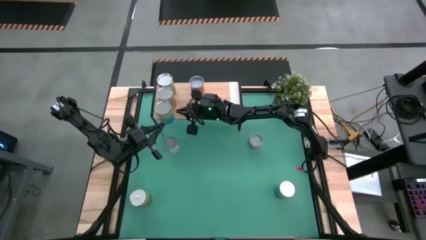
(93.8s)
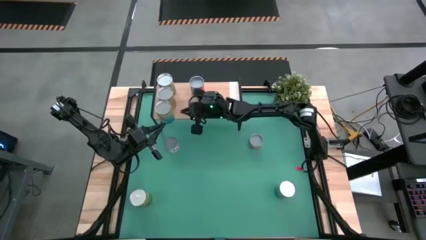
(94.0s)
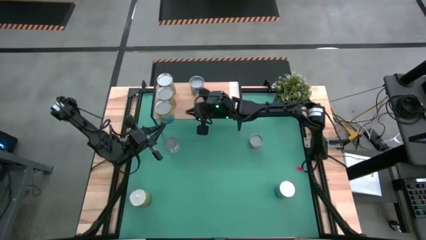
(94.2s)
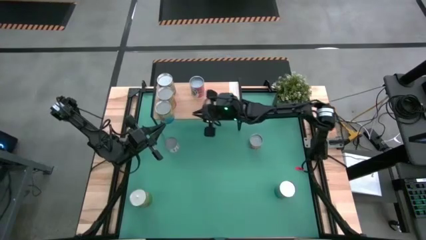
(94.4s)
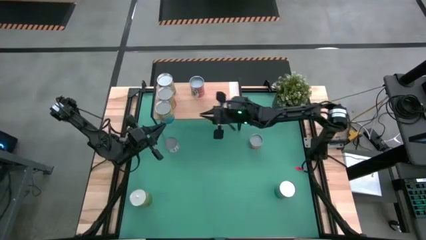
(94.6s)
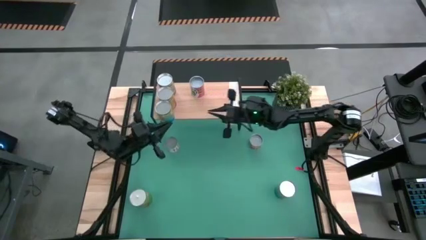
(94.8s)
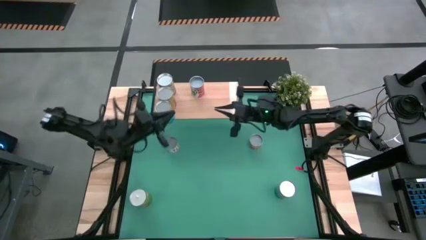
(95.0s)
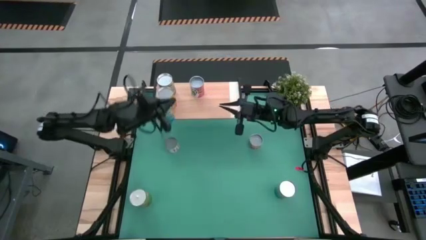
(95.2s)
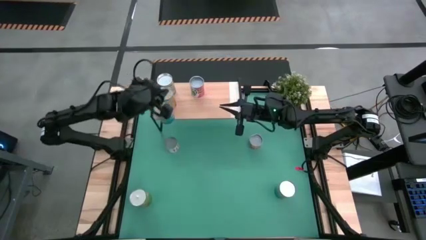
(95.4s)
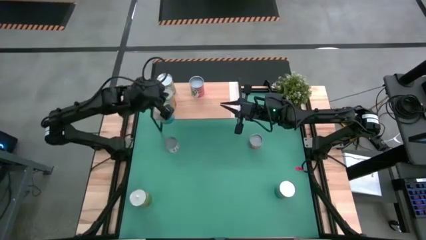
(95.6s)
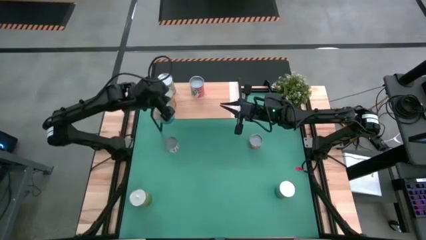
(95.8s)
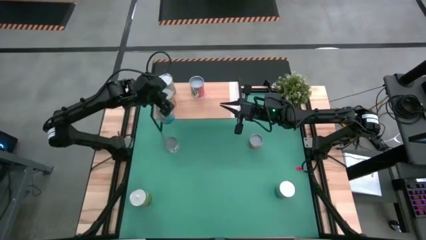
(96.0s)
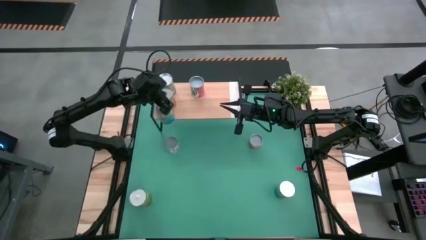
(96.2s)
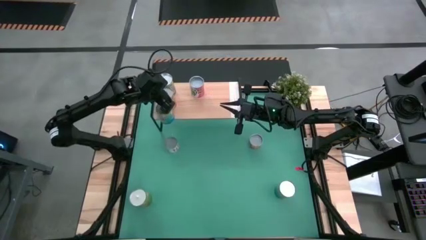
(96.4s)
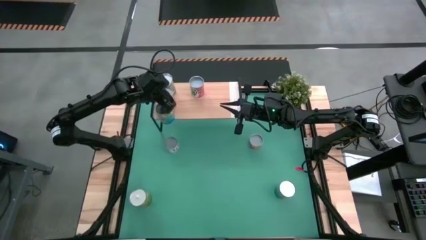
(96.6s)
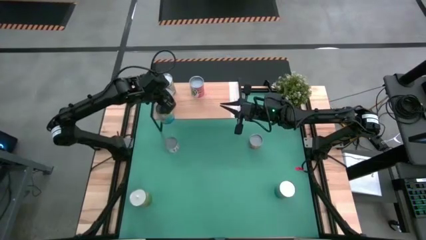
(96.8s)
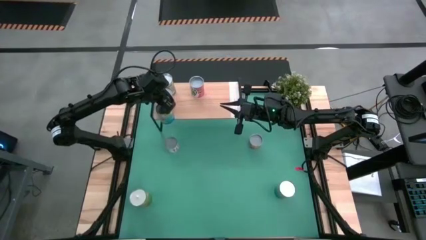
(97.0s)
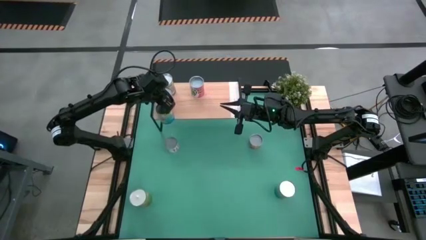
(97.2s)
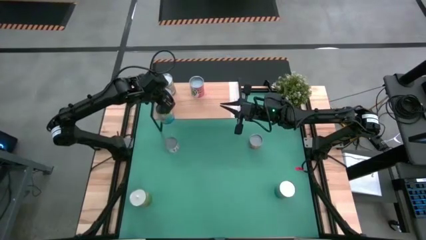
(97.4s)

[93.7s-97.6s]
Task: Pick and place cans onto a shelf
Adjust the canned pineapple on the shelf

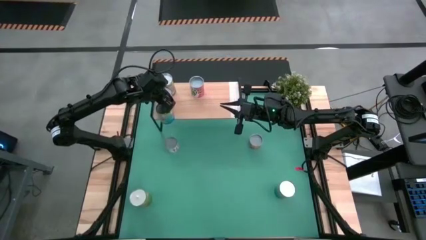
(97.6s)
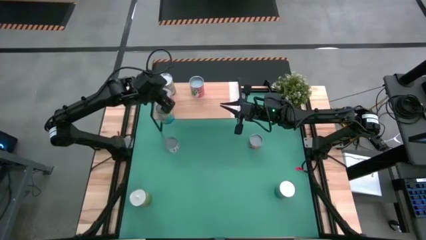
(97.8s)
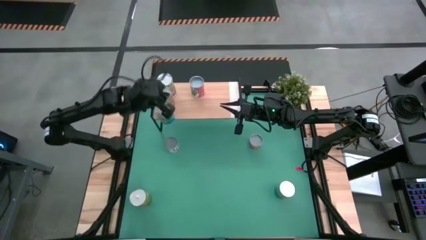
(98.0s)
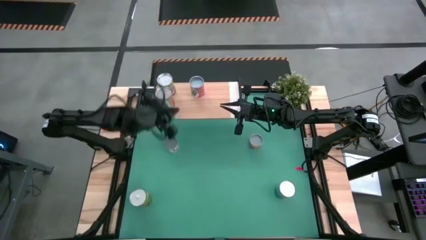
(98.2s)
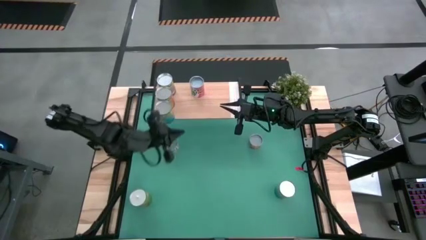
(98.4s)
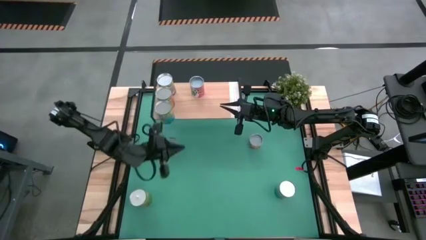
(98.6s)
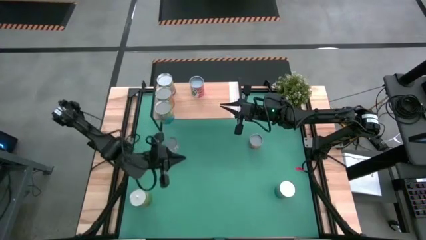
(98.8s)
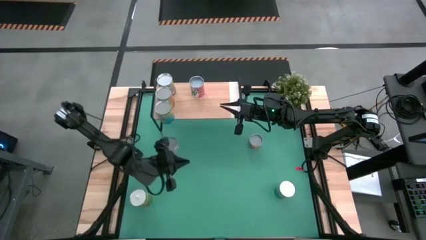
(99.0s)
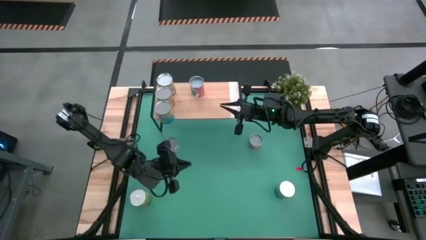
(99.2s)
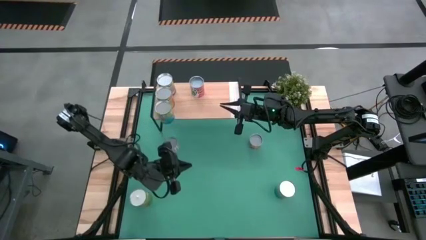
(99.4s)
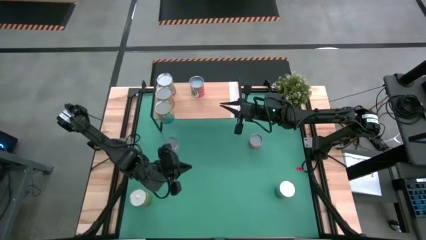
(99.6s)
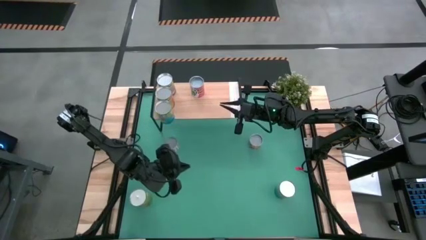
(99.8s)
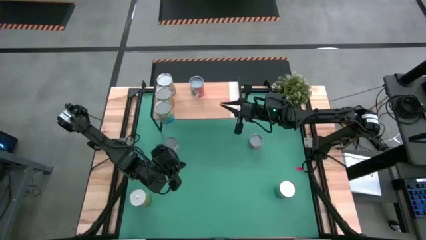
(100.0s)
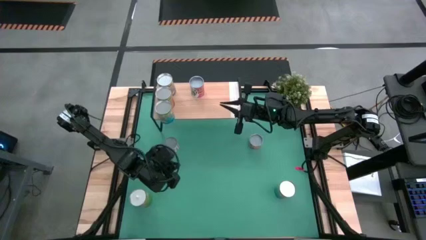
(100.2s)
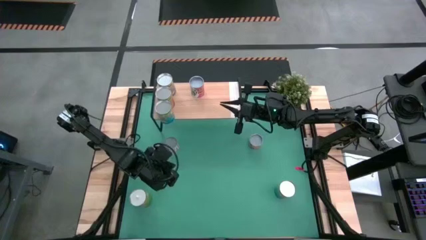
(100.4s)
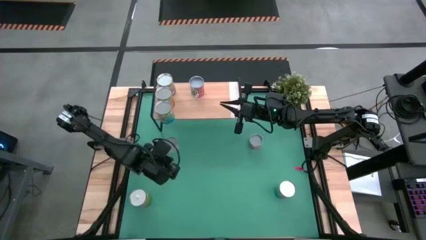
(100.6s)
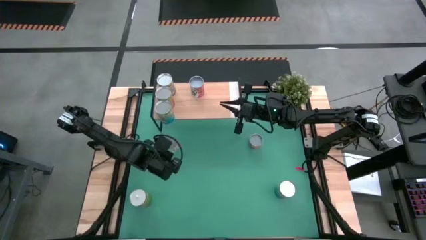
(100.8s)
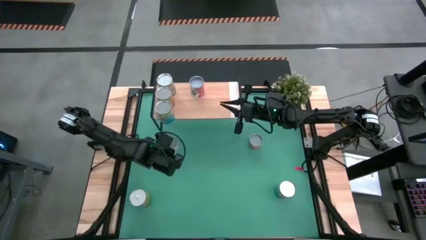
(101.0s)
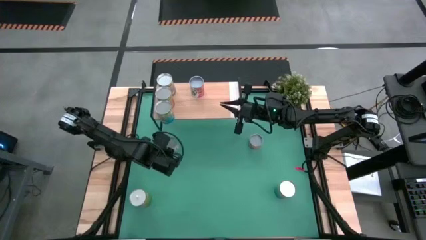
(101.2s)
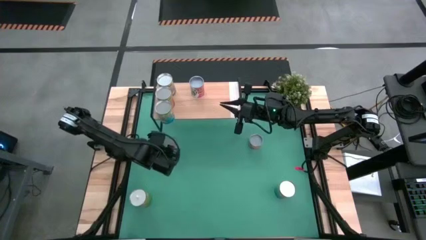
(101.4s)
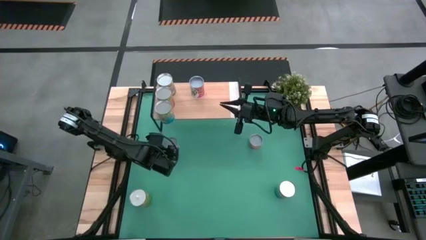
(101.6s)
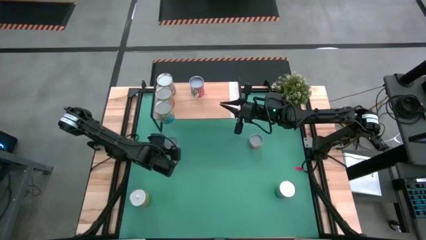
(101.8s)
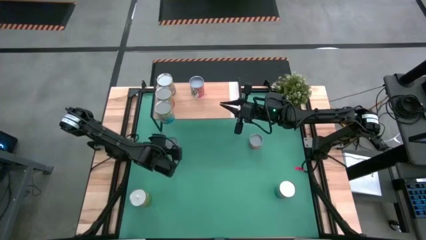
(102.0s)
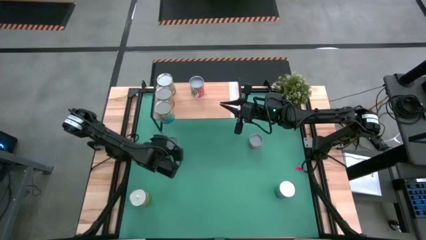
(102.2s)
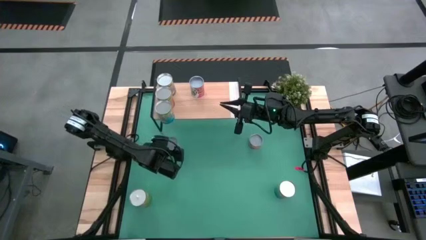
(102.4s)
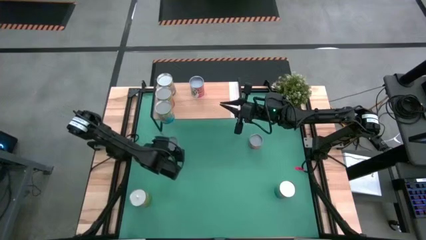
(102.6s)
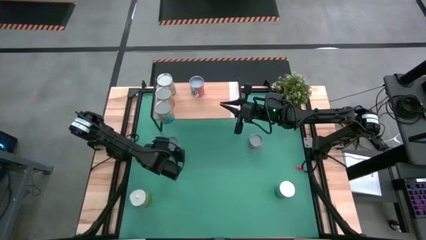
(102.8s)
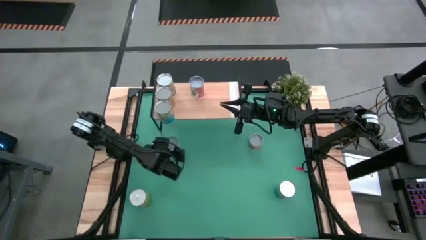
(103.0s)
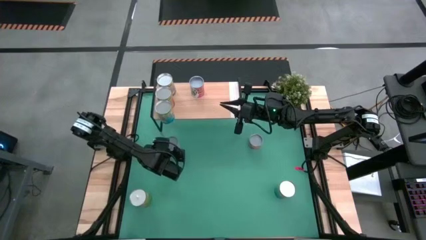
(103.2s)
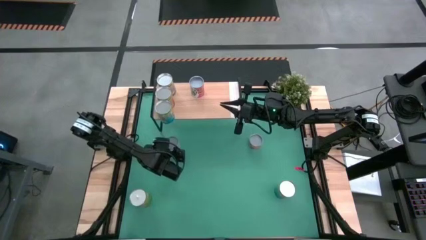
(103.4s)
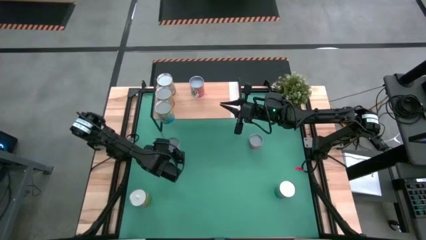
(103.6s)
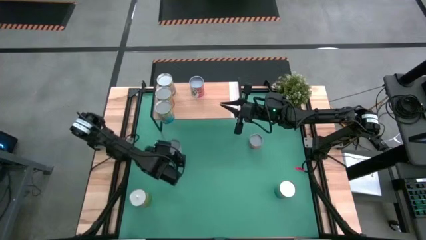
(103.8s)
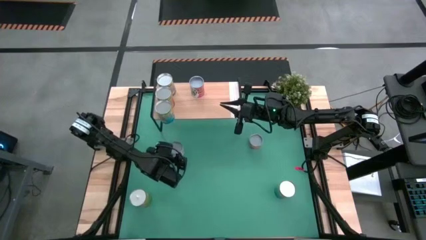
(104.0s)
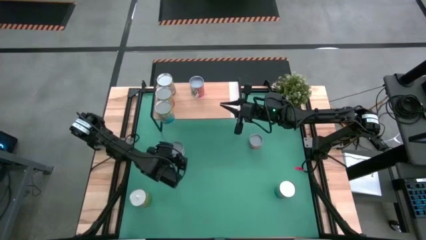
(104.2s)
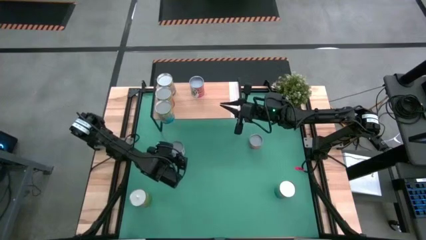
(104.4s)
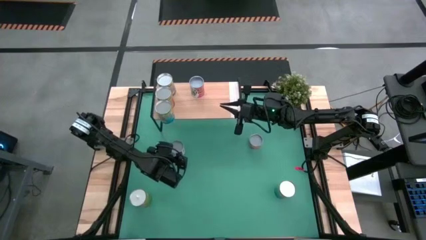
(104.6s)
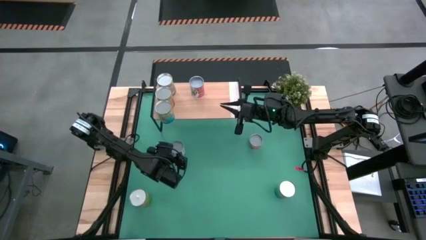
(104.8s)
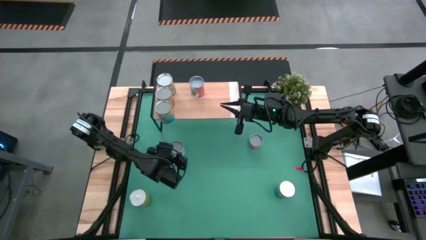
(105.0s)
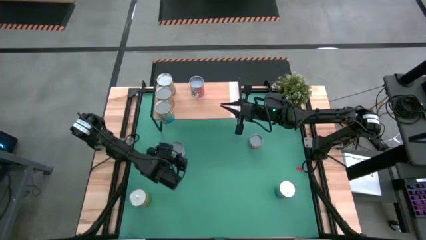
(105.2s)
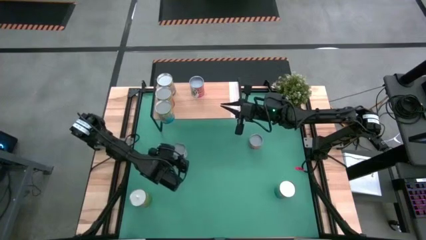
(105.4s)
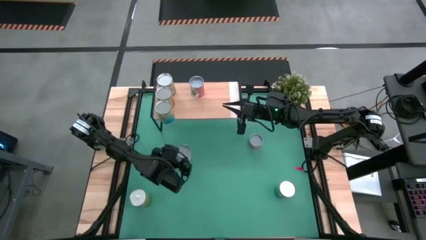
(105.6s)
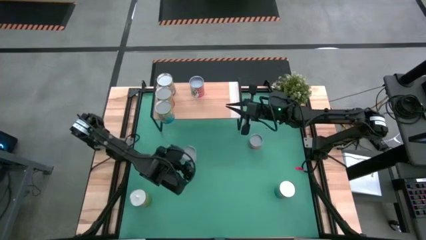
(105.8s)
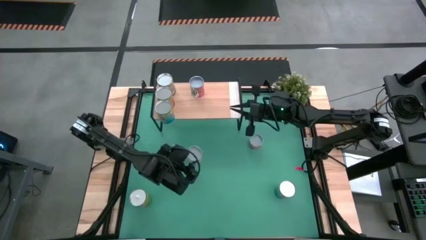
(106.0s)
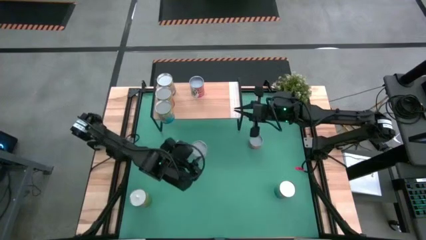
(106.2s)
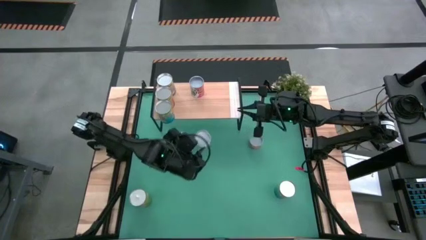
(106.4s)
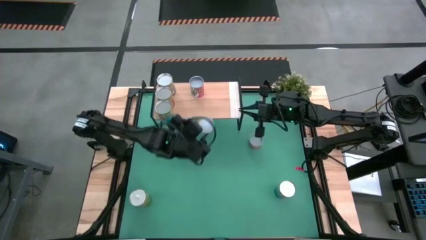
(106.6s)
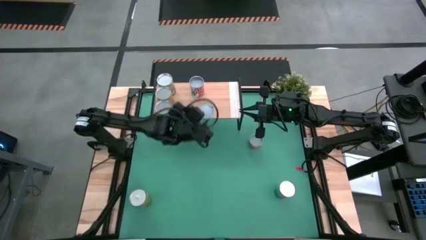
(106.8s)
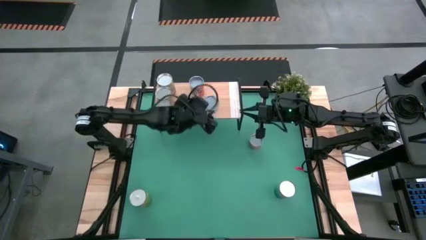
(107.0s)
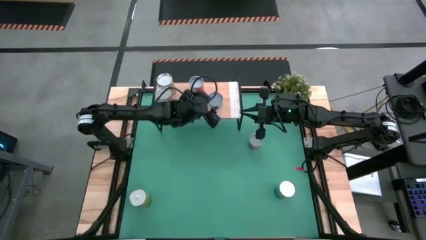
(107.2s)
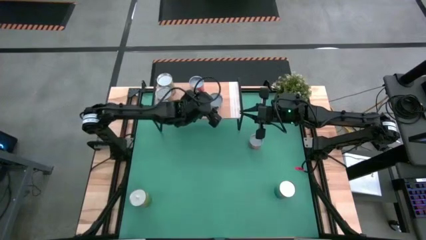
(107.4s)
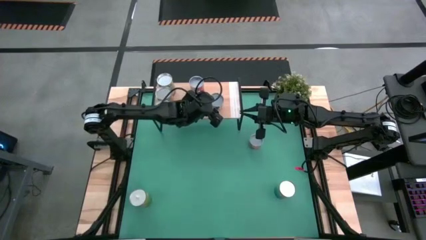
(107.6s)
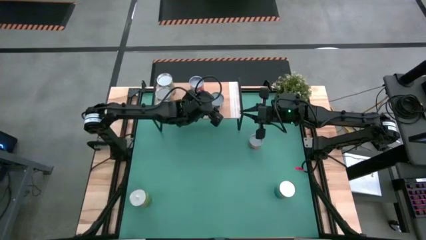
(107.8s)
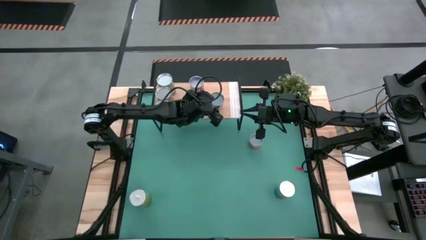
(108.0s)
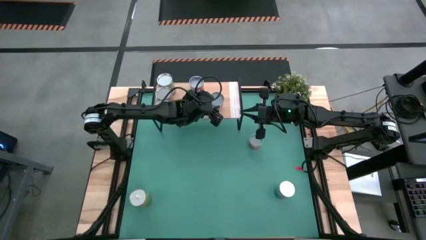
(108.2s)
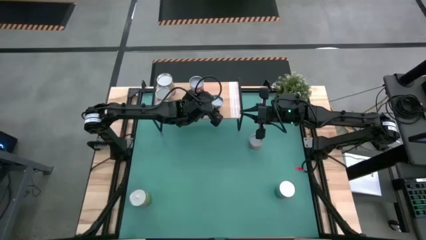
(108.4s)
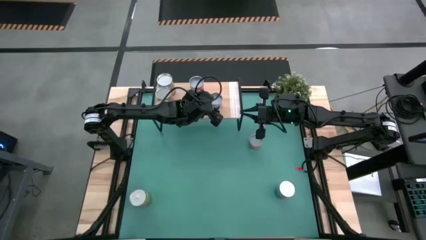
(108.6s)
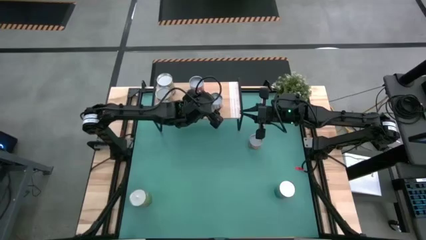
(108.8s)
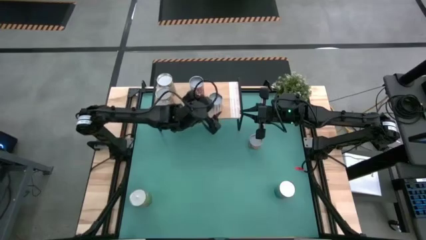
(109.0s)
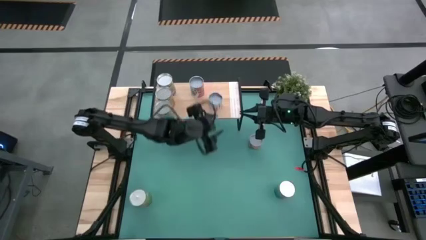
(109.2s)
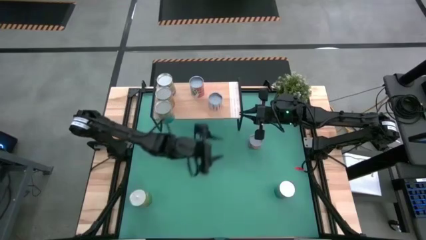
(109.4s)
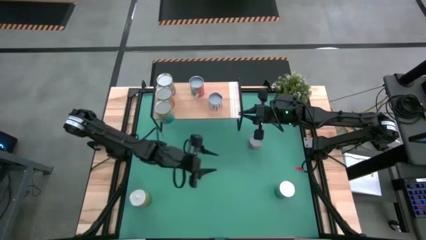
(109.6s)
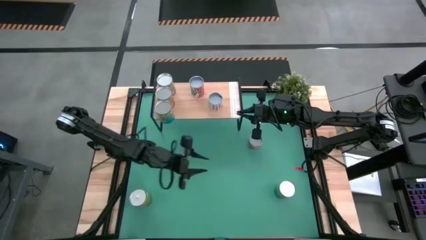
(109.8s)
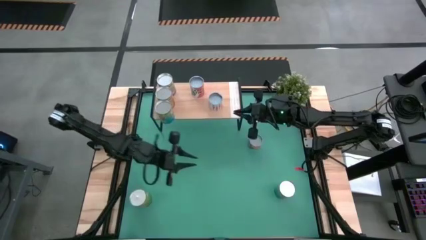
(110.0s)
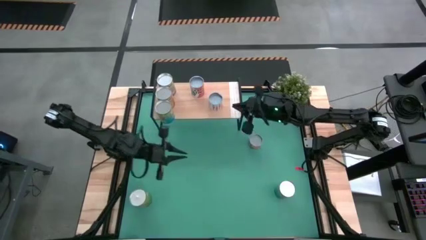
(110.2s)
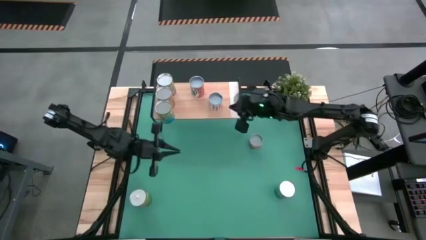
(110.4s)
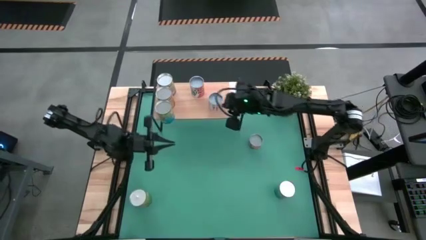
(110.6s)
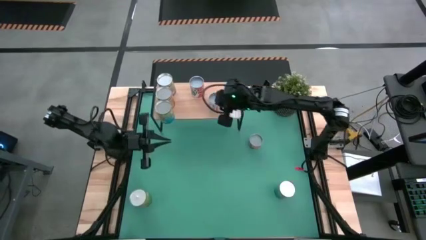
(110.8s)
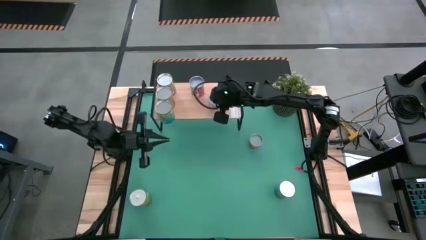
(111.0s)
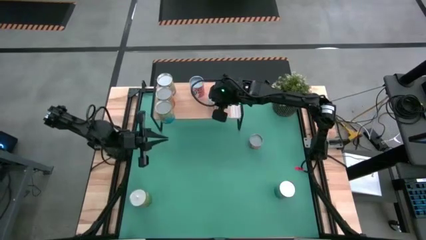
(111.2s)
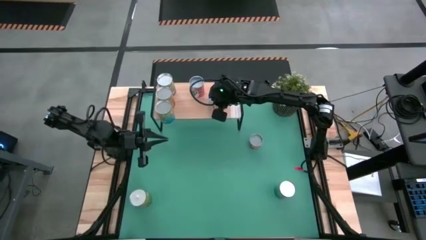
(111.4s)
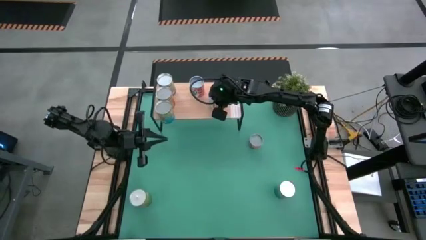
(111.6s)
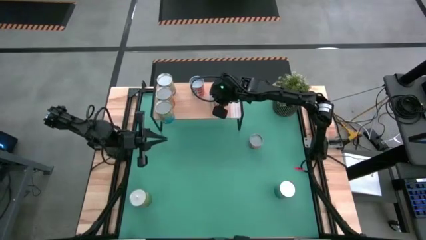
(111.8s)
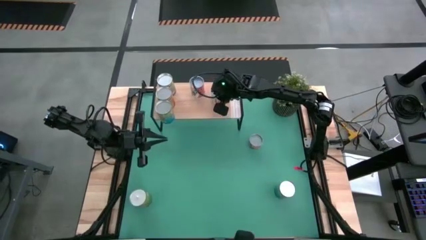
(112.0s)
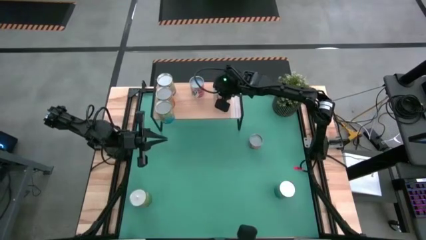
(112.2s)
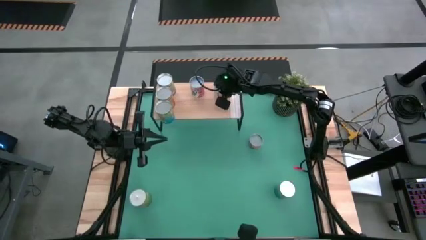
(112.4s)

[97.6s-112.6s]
Put the canned carrots on the shelf
